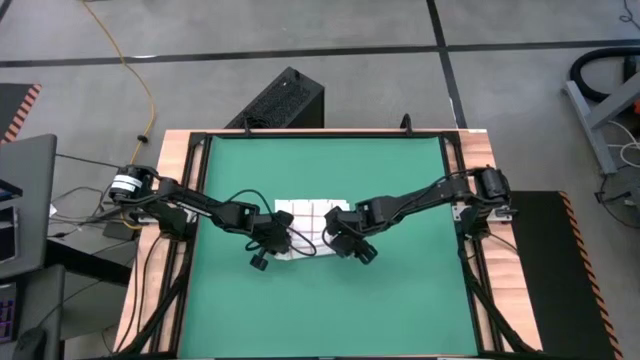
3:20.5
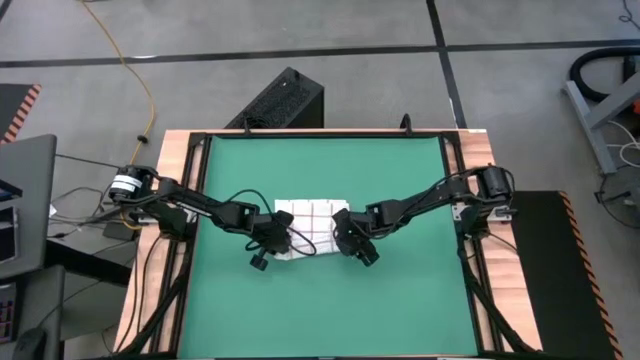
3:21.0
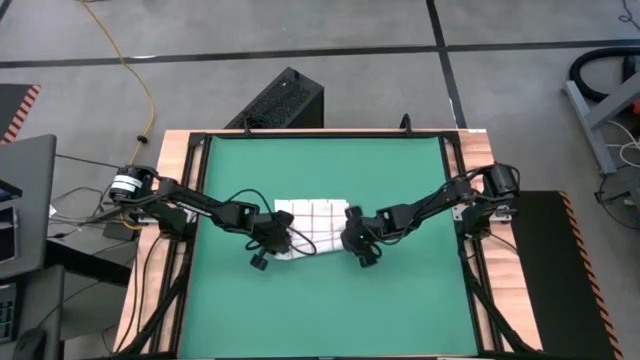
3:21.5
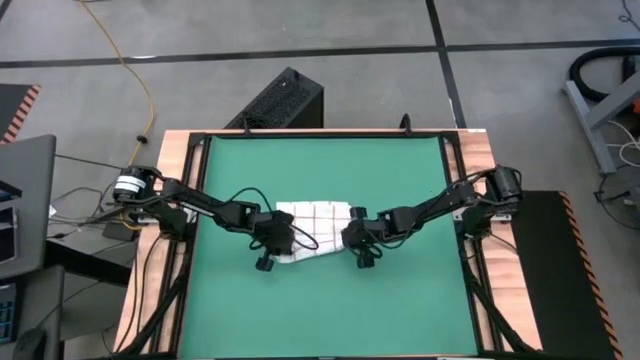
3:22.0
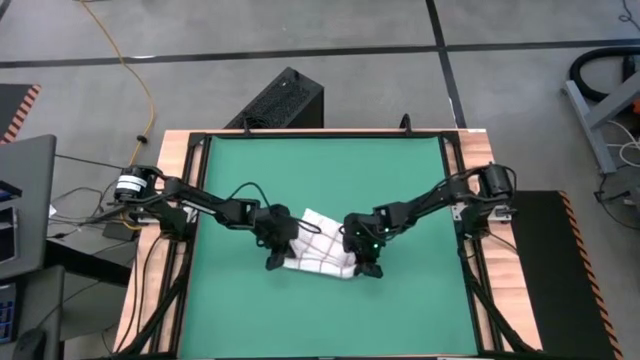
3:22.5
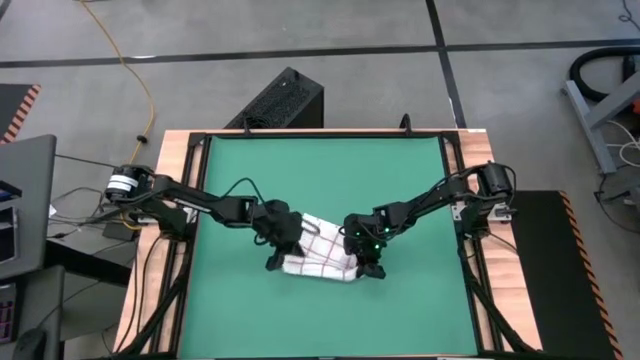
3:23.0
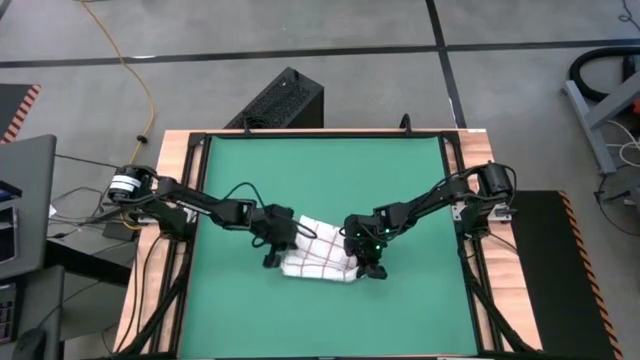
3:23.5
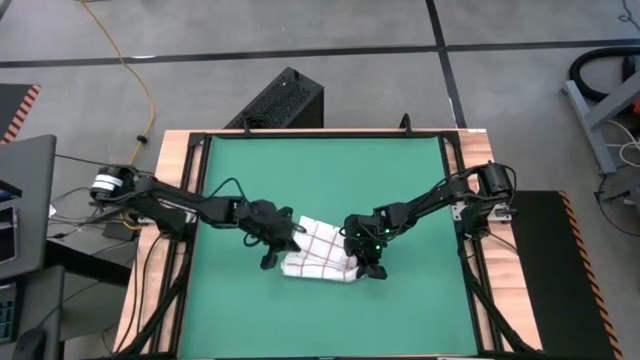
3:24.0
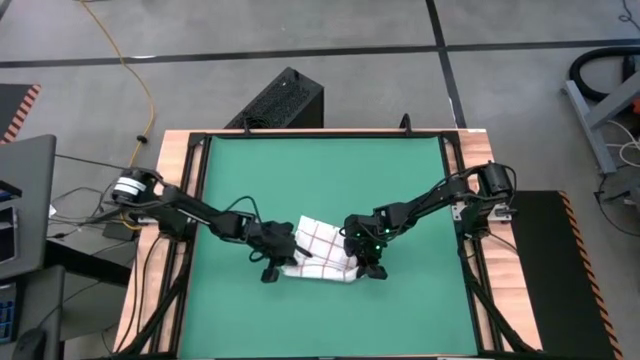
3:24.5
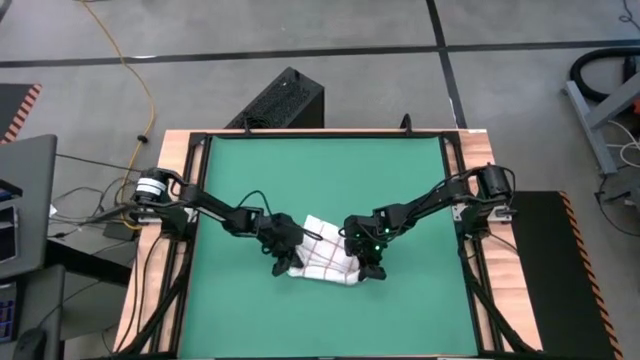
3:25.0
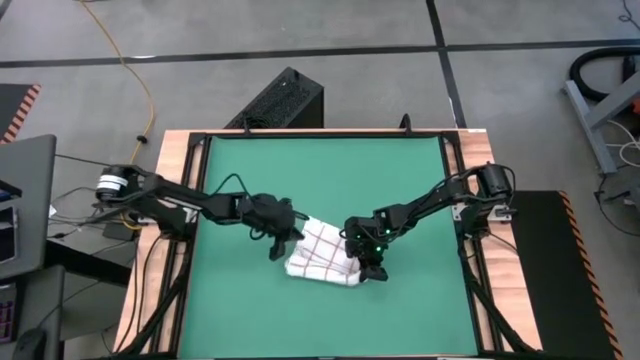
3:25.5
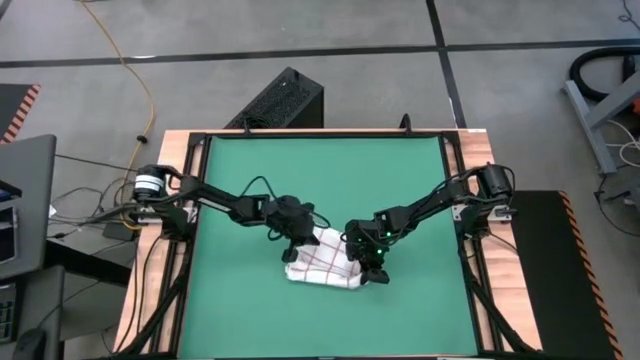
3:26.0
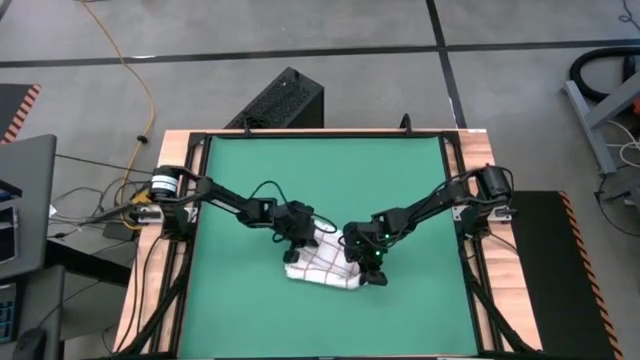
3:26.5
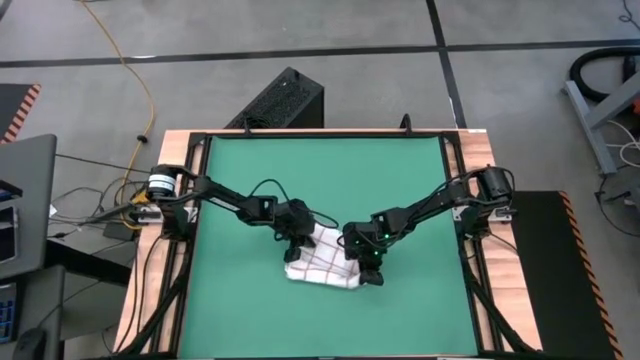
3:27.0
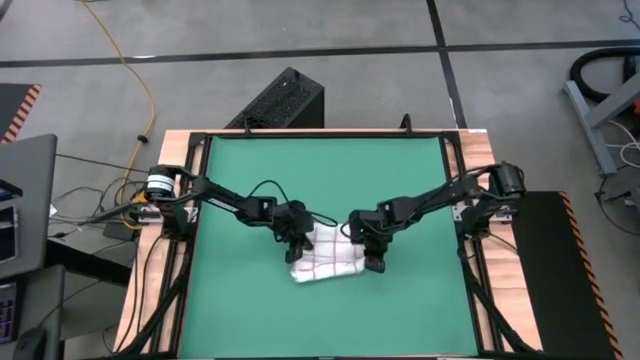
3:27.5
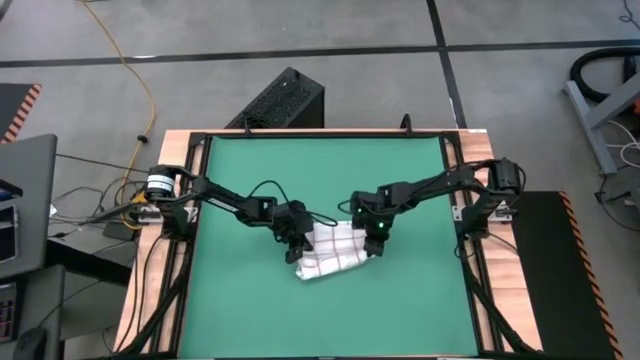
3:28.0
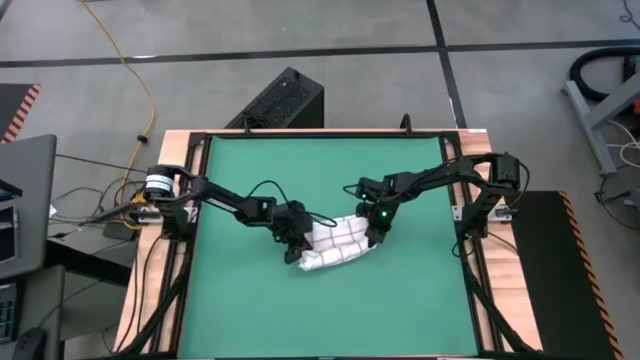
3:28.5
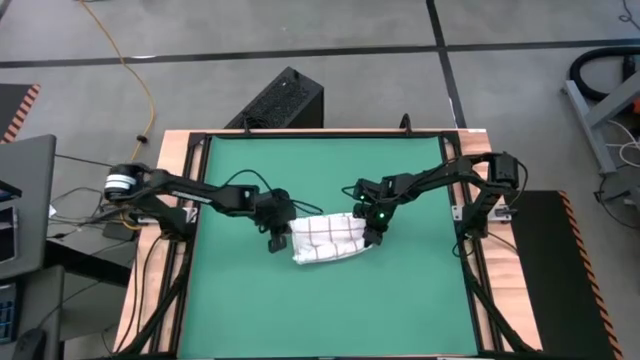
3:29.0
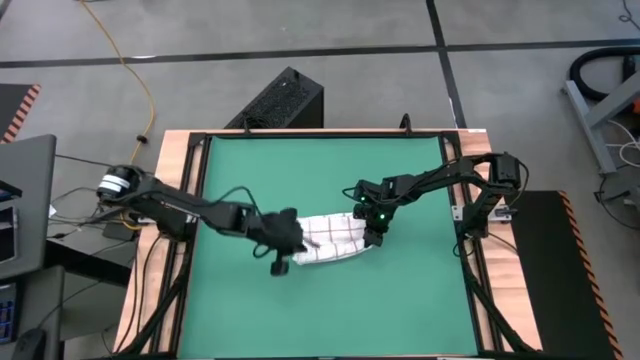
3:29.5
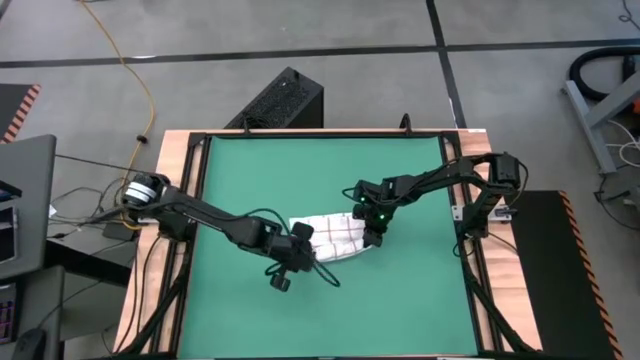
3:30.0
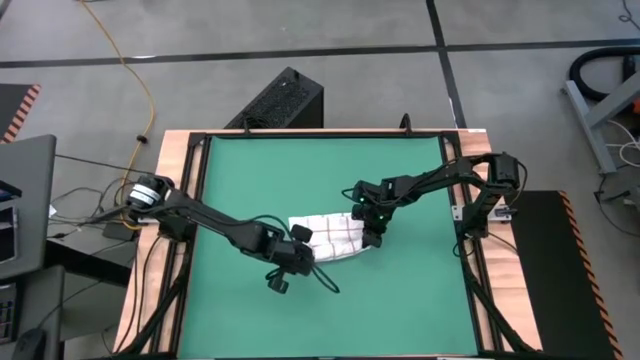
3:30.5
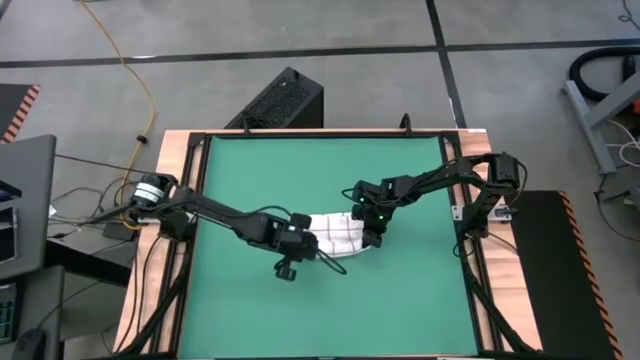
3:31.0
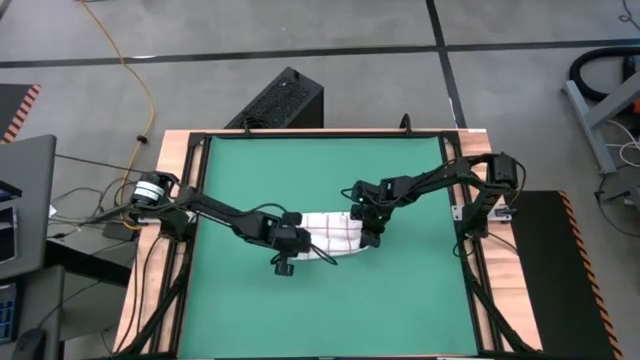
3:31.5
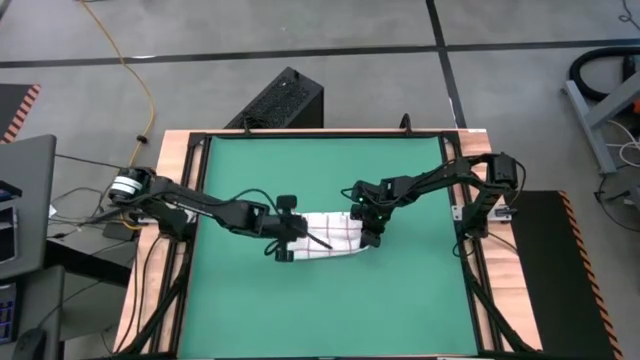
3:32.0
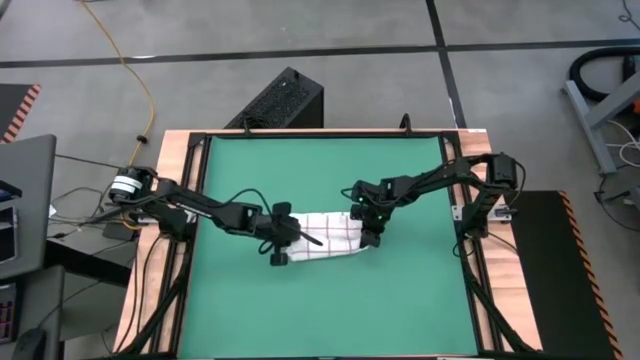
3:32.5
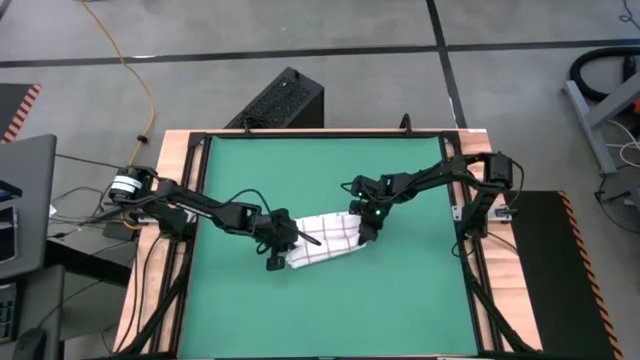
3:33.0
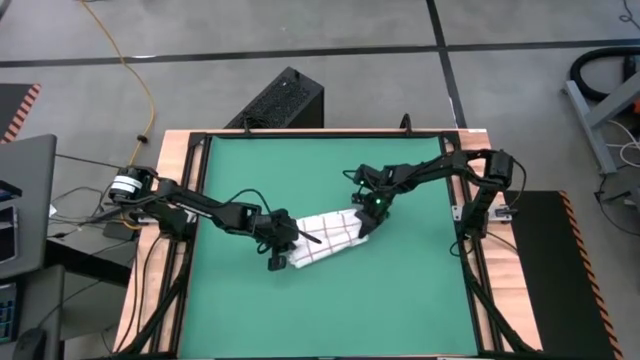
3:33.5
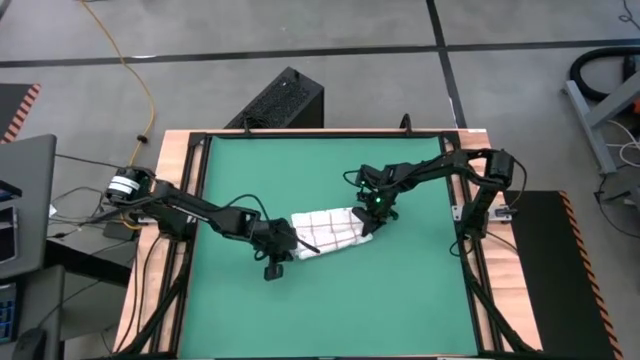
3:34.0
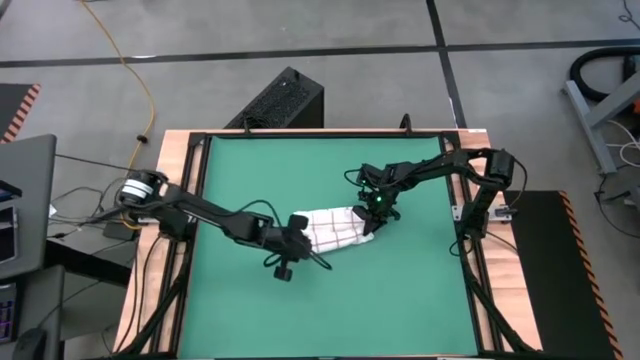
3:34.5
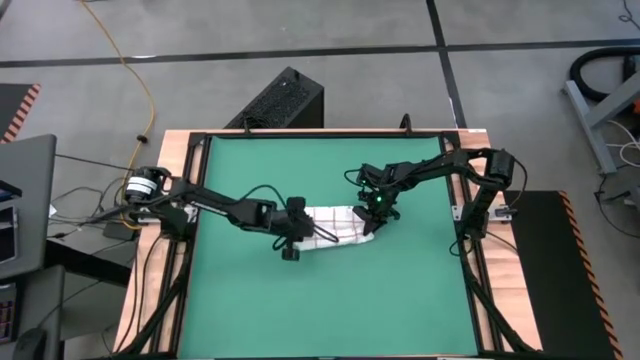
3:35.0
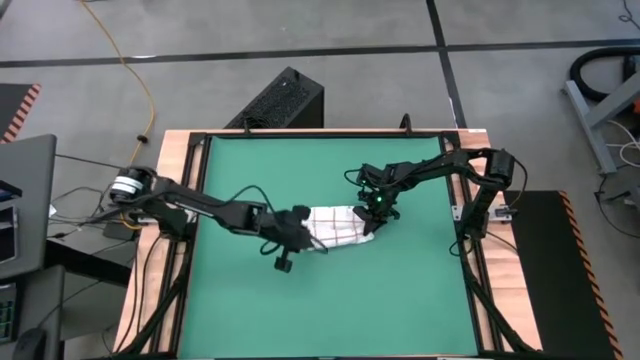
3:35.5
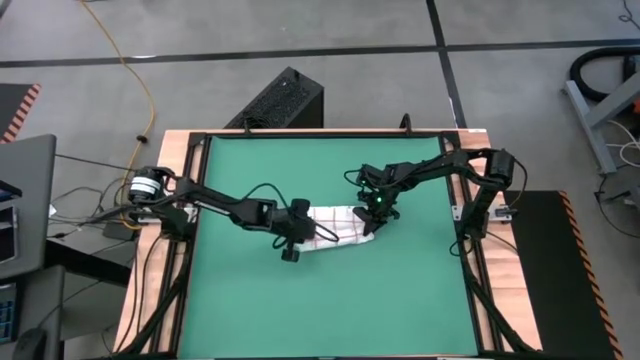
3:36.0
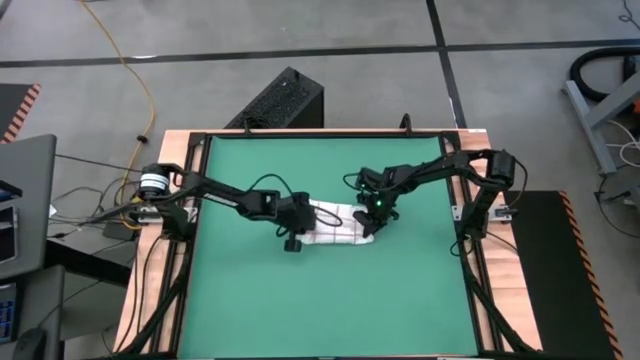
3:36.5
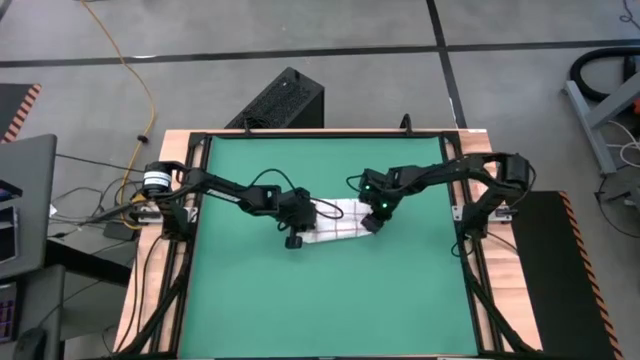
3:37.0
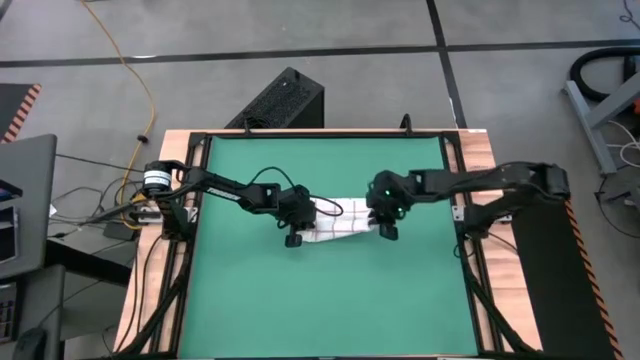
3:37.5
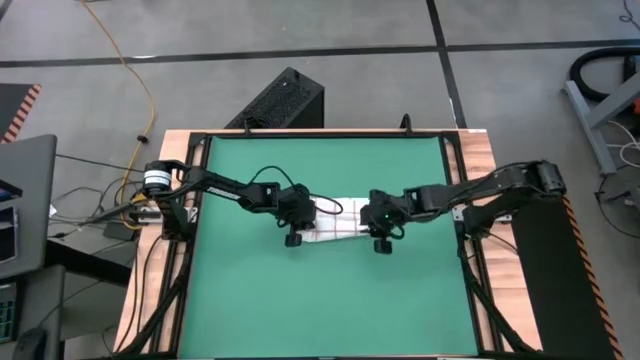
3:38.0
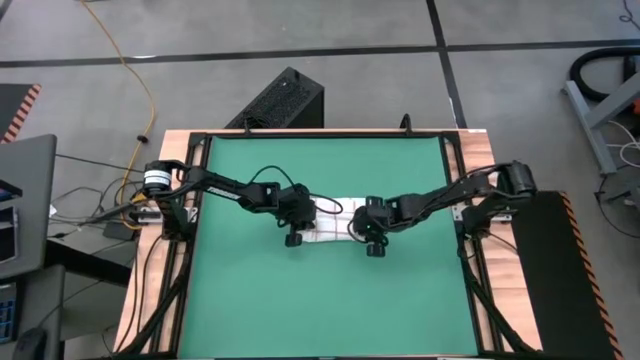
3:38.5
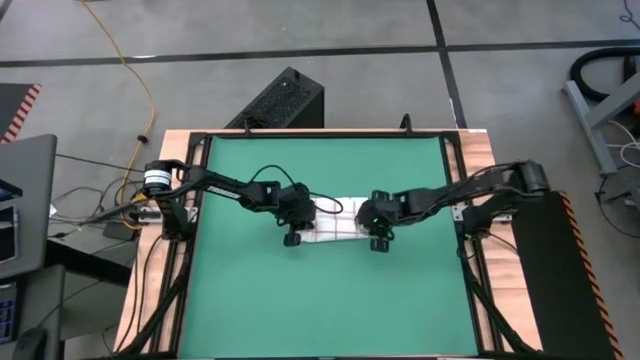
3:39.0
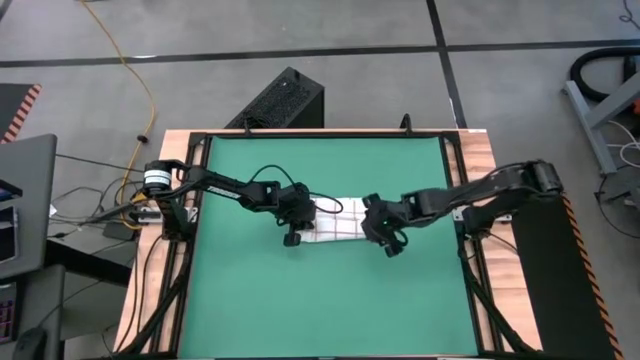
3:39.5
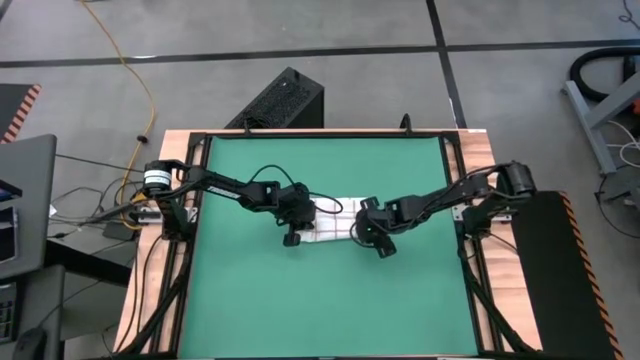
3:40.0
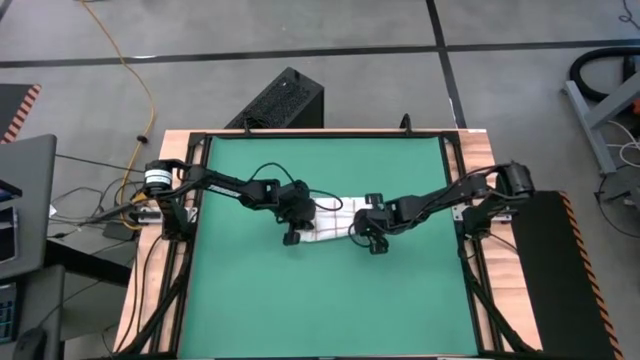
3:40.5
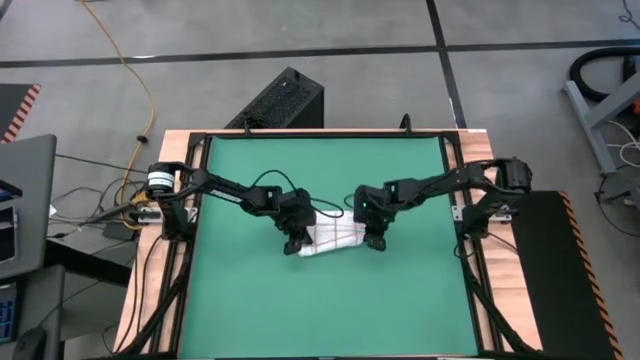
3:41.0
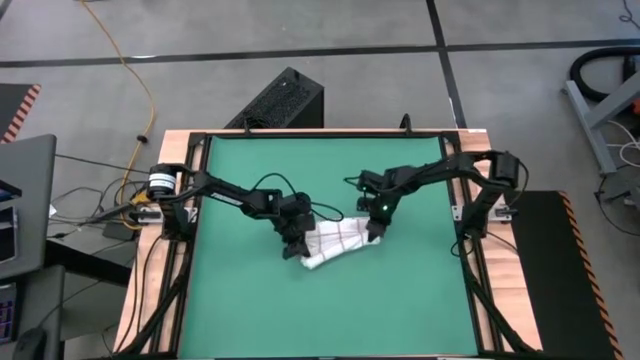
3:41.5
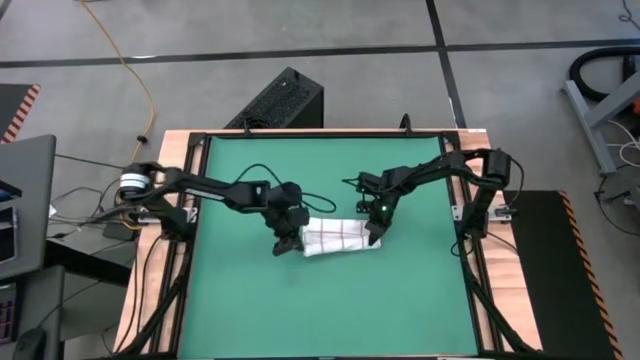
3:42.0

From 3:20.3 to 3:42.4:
Task: Roll towel into tight, uniform cylinder
Roll the white patterned towel
